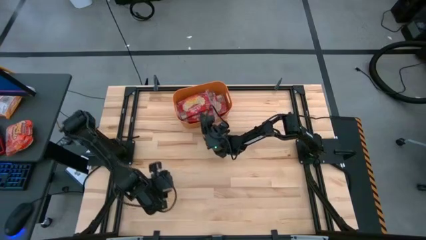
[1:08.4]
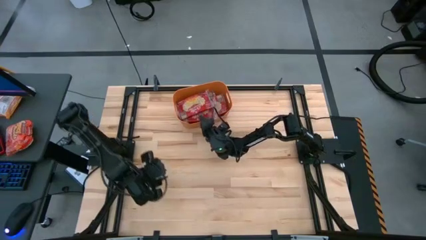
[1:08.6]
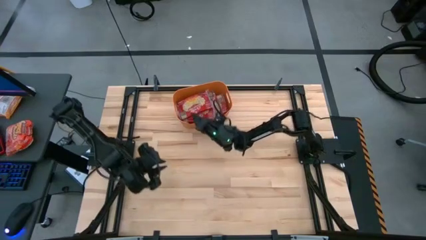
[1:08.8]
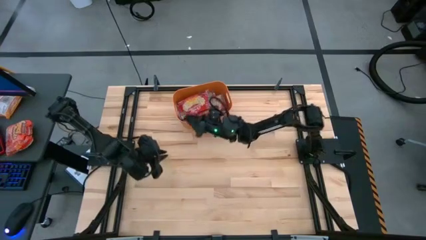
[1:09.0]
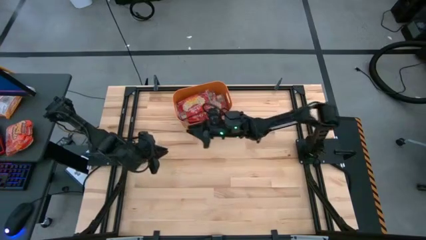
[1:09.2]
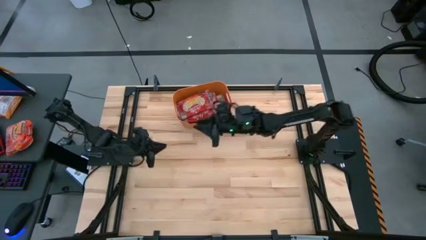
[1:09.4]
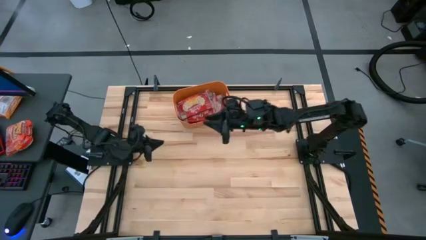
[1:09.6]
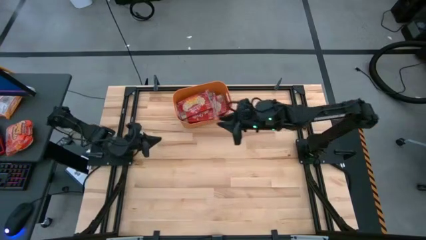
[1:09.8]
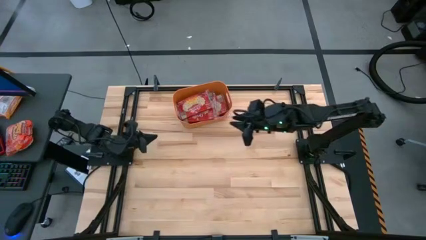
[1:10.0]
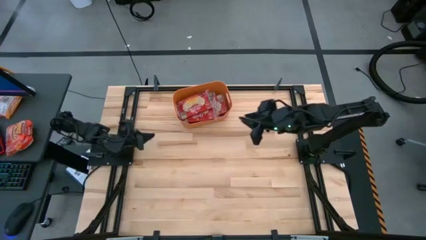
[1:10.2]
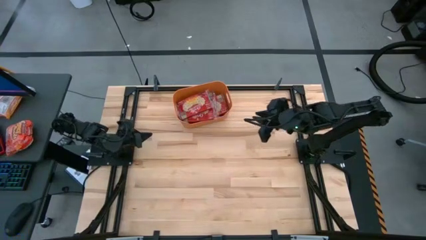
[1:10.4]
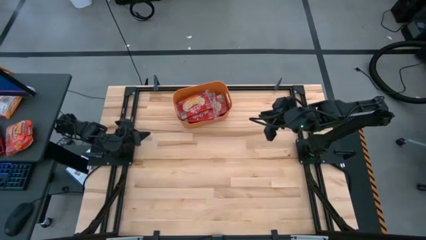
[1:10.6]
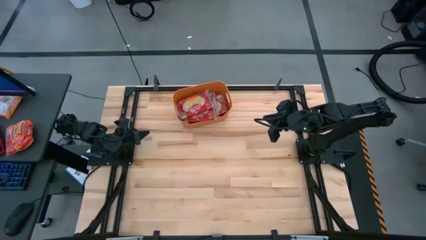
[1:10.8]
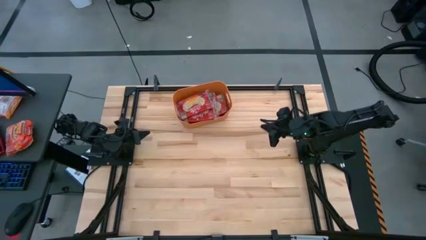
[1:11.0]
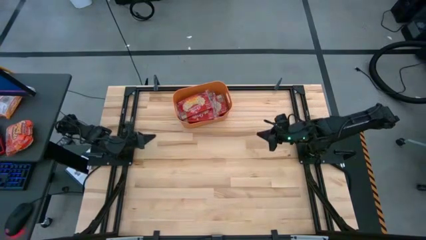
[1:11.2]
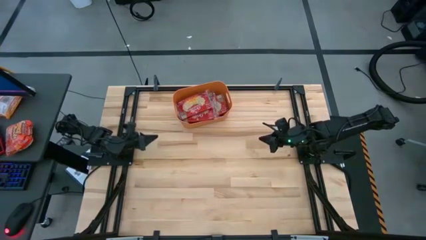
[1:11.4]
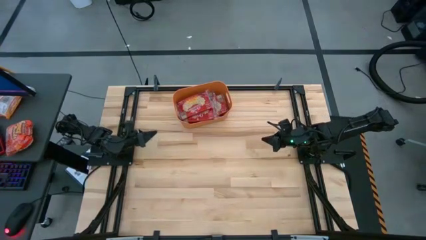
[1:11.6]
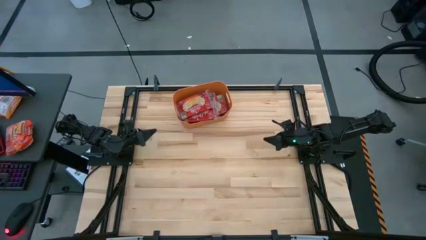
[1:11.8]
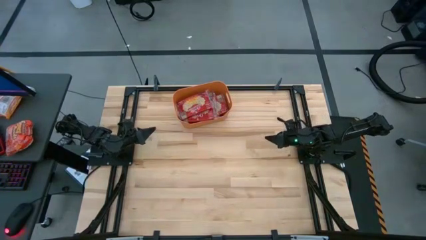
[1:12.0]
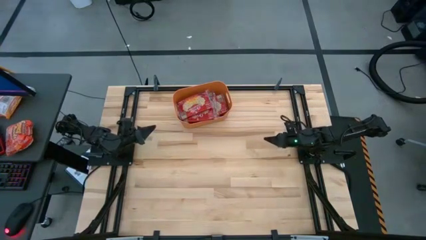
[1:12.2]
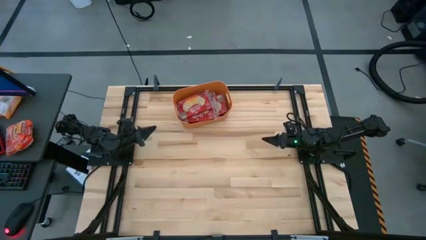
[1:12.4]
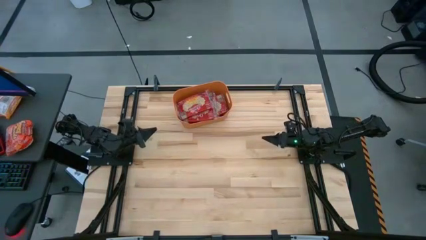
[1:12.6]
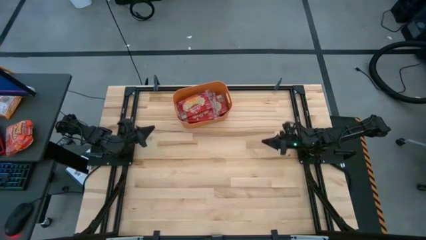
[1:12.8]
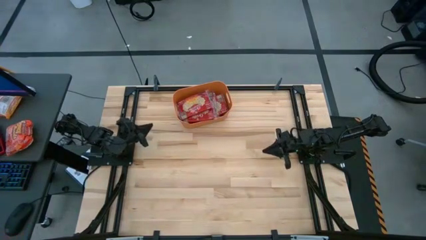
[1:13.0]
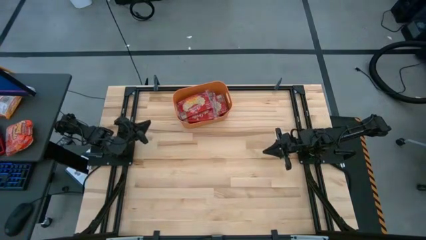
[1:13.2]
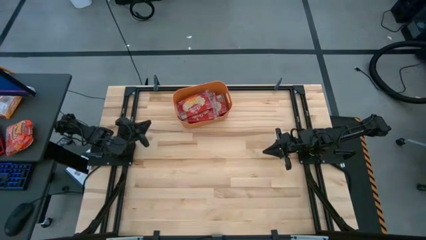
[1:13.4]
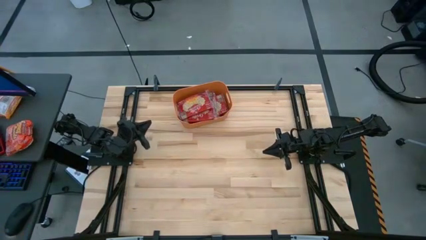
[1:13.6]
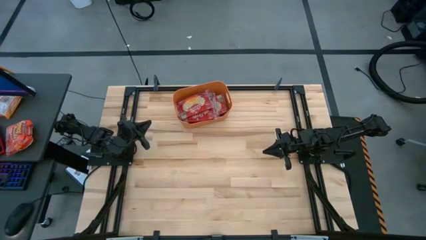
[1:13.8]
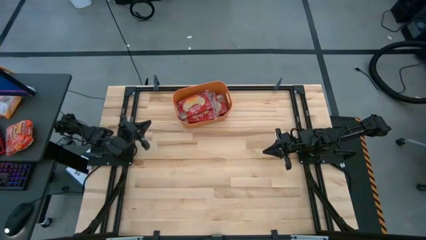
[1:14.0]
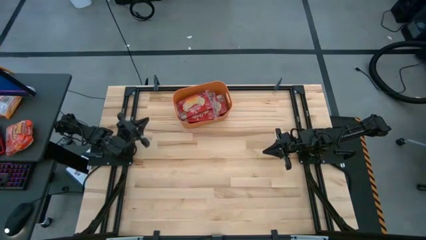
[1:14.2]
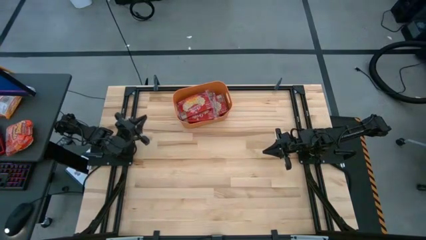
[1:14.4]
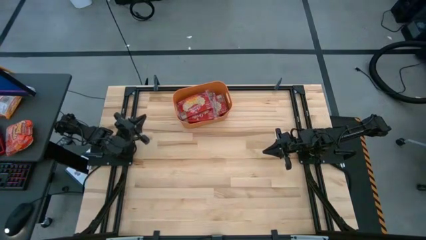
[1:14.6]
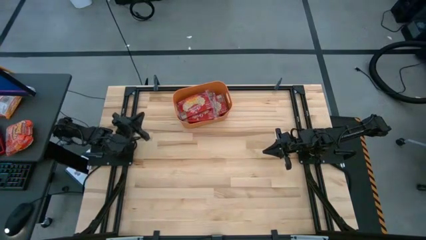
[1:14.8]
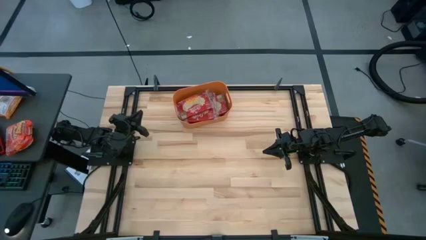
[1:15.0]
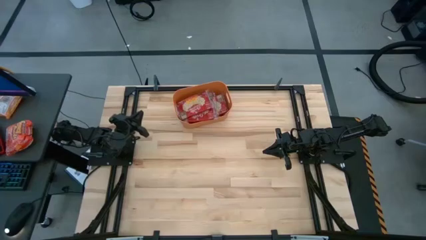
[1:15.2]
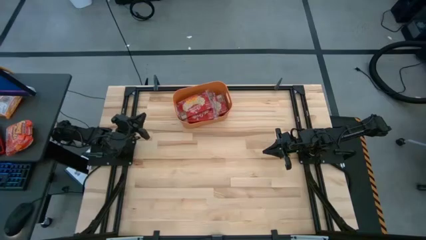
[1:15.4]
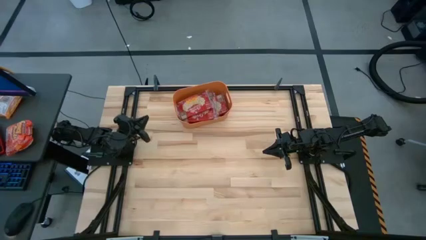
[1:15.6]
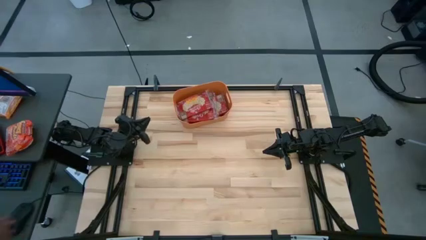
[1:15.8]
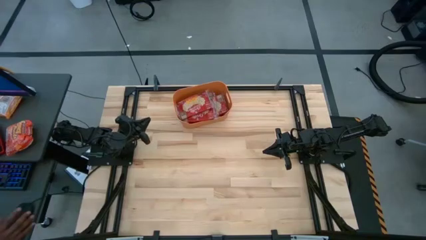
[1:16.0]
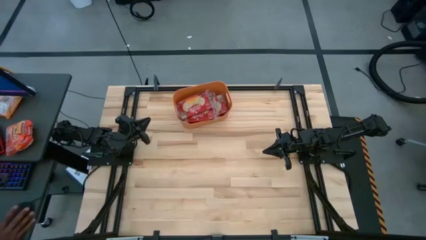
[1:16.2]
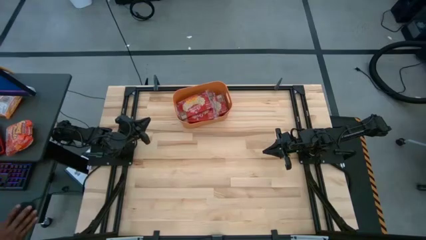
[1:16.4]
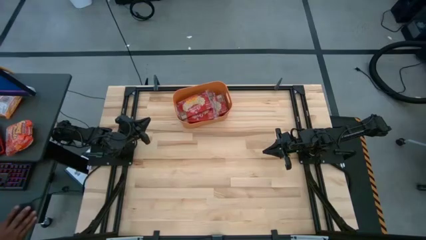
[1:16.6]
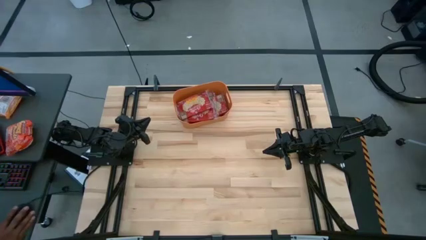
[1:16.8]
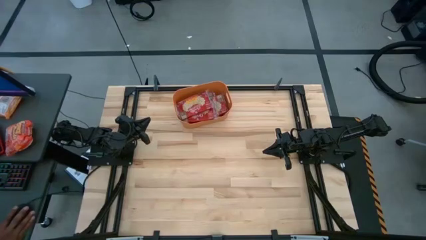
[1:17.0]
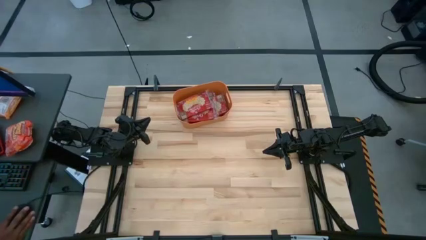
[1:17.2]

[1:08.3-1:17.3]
Task: Sort popcorn bags into baskets
Return to Home Position

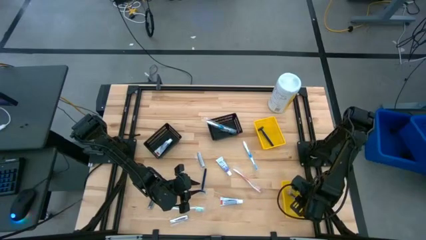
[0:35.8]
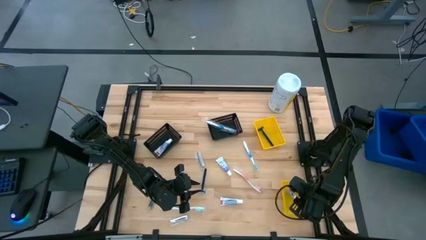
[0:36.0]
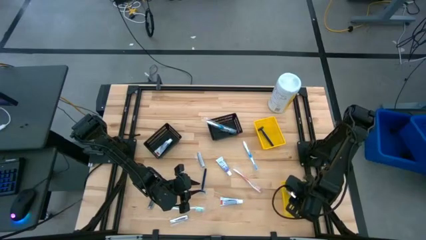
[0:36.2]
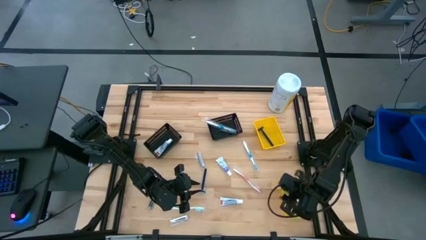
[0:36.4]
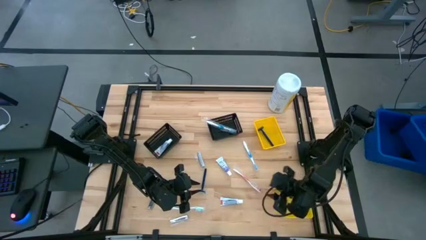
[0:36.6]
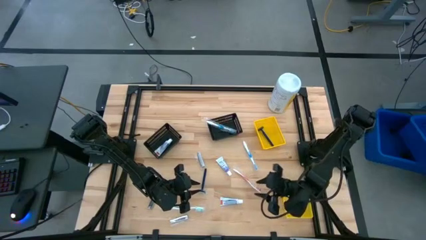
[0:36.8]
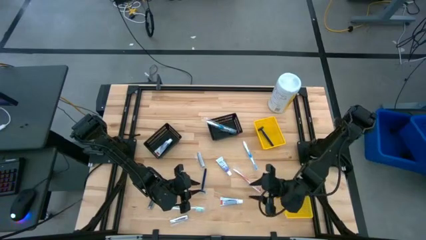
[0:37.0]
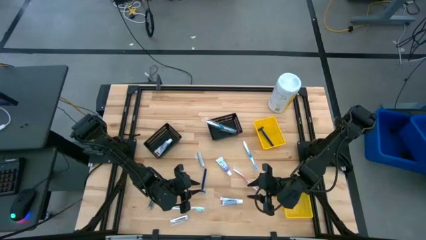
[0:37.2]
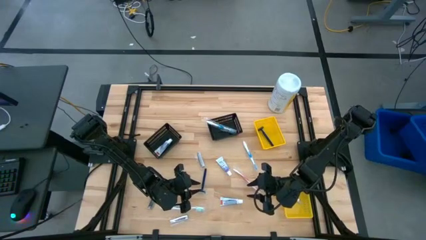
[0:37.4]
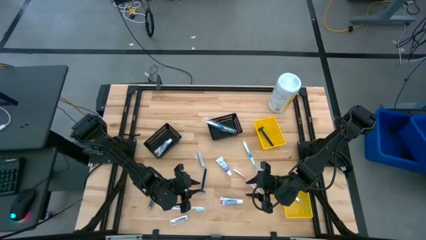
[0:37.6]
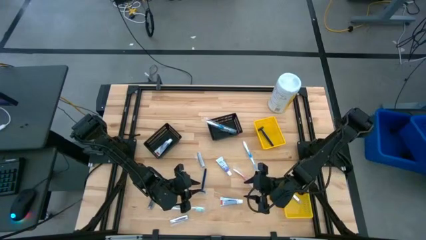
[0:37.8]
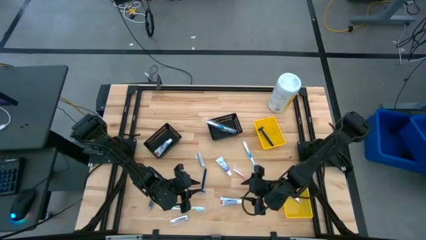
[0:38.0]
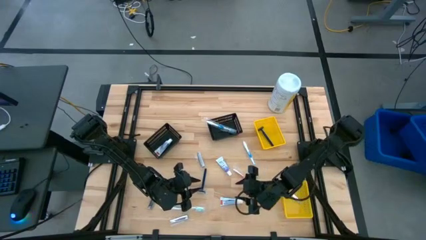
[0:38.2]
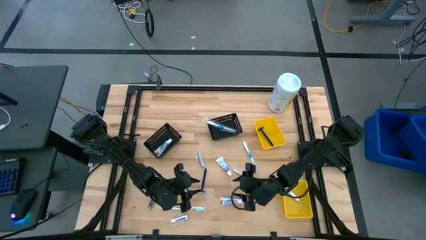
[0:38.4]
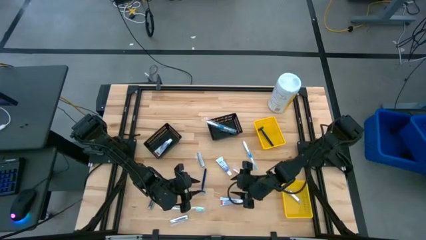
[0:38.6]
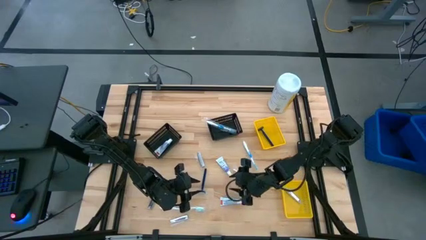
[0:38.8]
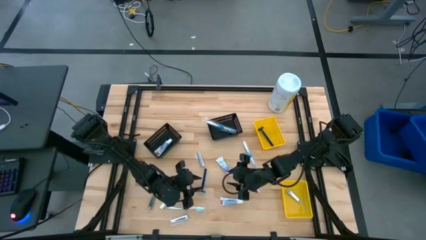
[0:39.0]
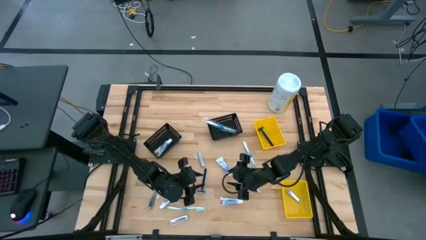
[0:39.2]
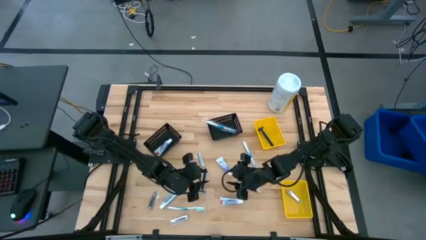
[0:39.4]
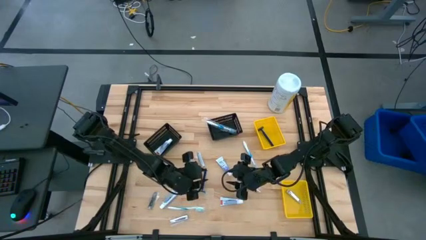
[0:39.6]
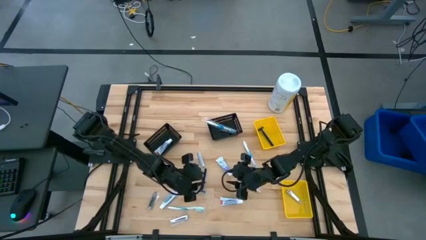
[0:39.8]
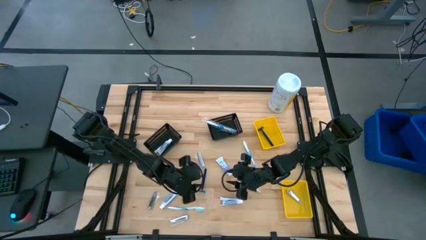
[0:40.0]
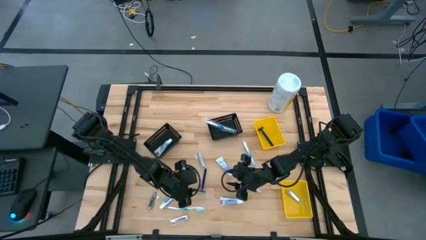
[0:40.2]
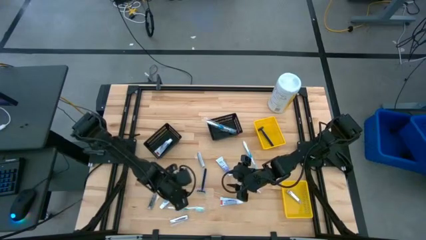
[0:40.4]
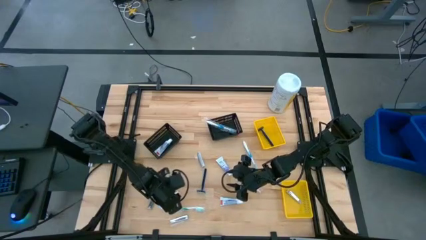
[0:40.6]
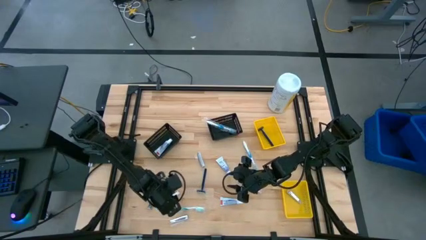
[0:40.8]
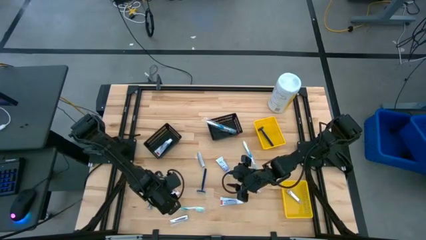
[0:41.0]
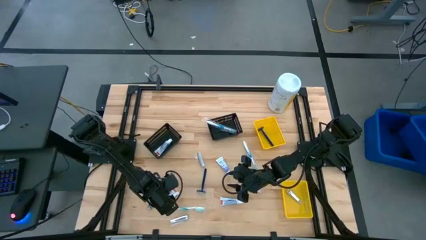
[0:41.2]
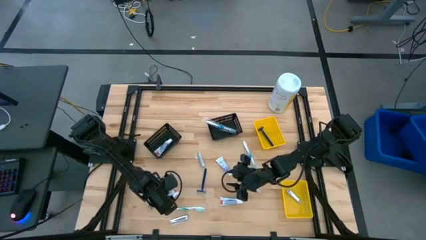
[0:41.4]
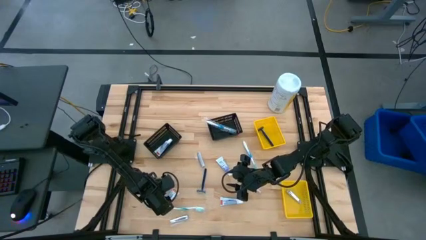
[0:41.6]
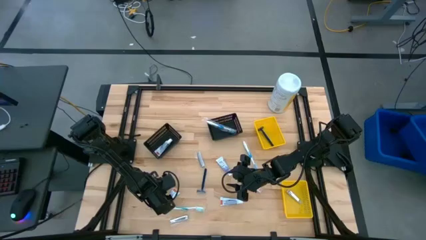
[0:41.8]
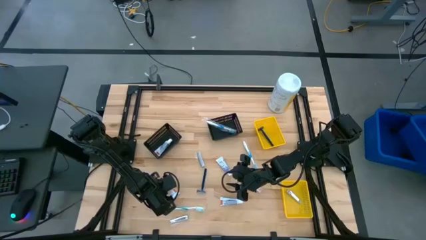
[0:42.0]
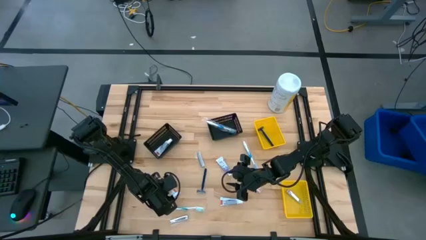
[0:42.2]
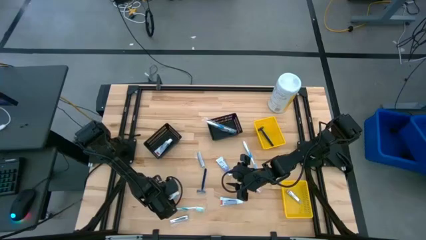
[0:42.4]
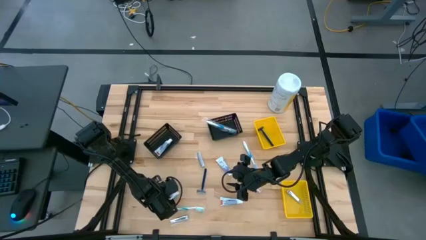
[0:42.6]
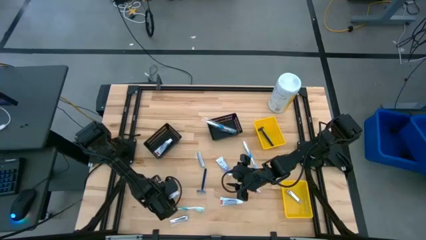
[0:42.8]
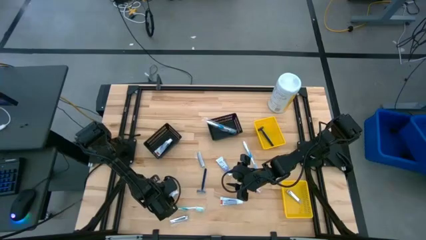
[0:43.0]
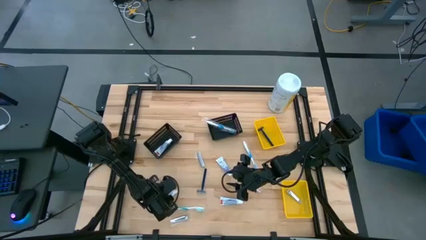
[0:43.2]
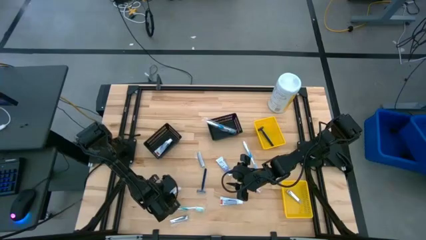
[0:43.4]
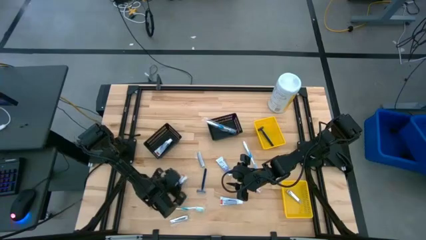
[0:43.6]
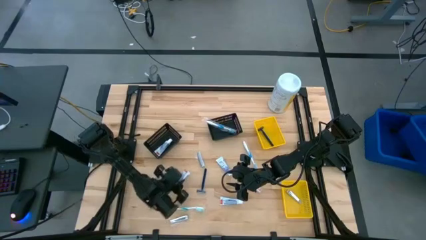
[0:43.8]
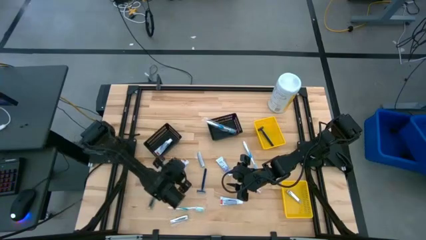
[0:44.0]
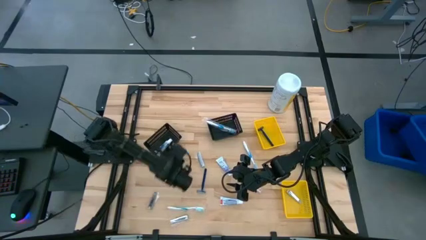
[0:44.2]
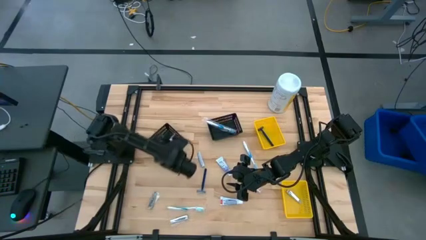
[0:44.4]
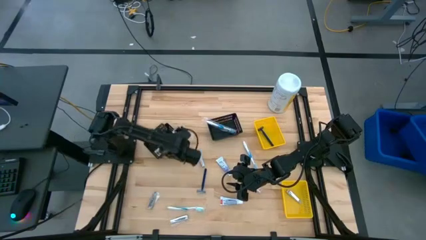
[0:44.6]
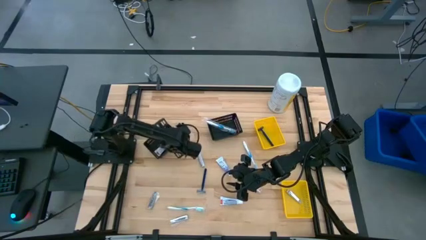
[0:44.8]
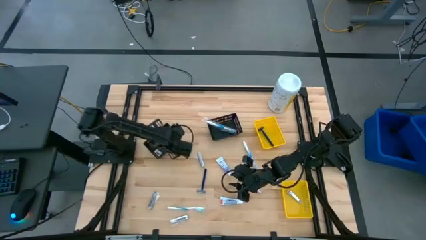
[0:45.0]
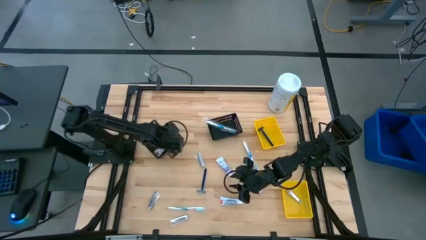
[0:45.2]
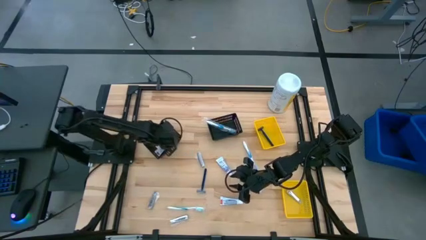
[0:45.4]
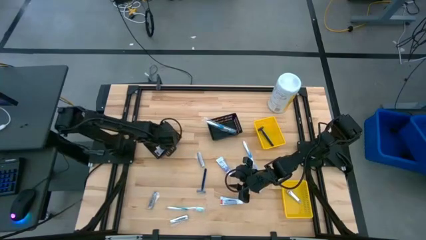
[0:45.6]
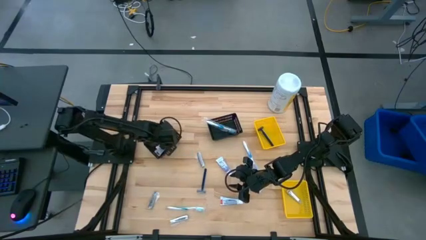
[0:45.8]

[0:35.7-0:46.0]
Task: Pick & Place Travel size toiletries
Put the white toothpaste into the left black basket
